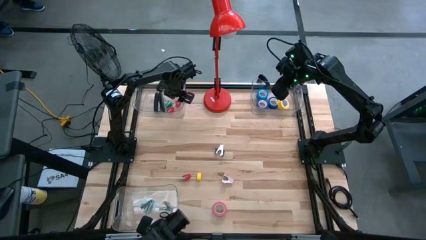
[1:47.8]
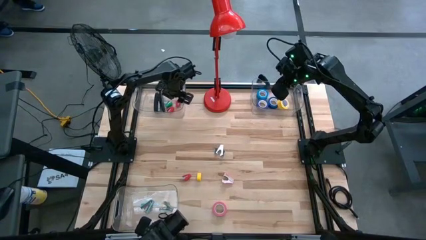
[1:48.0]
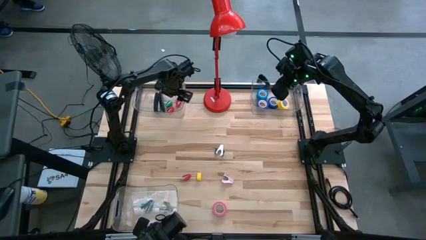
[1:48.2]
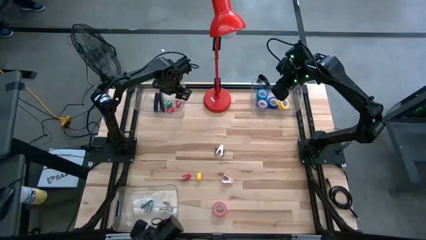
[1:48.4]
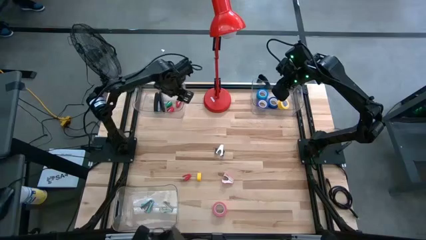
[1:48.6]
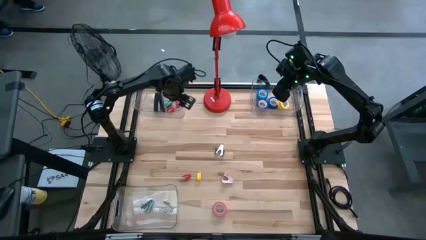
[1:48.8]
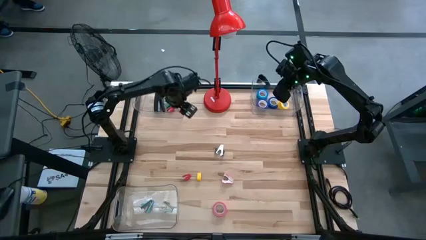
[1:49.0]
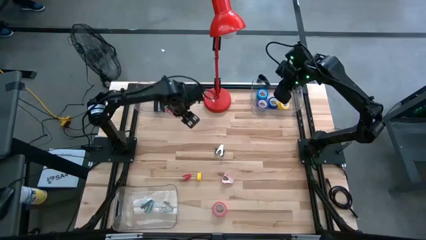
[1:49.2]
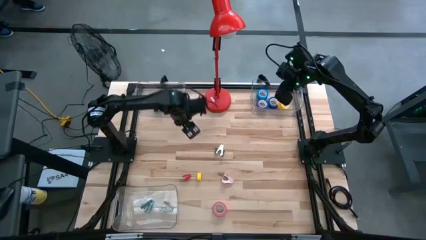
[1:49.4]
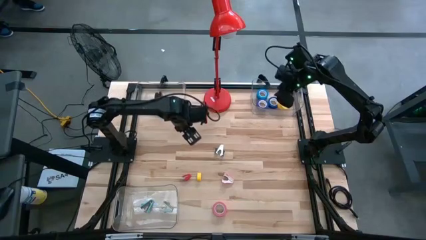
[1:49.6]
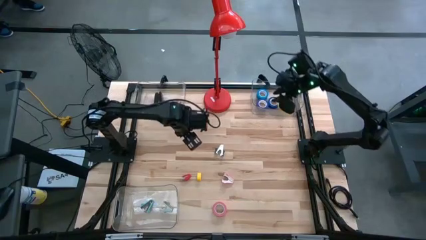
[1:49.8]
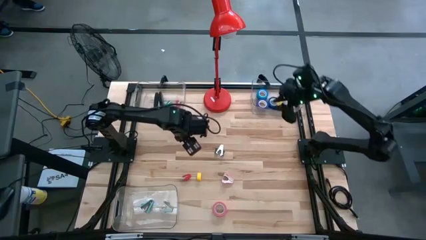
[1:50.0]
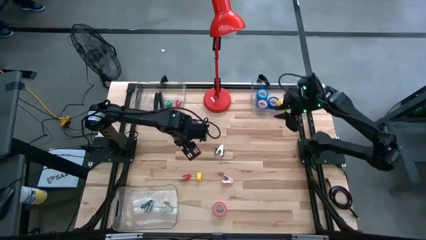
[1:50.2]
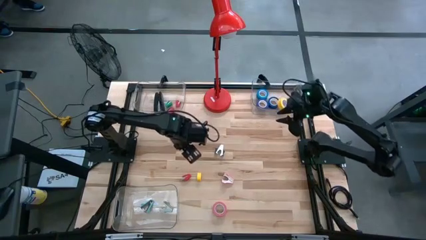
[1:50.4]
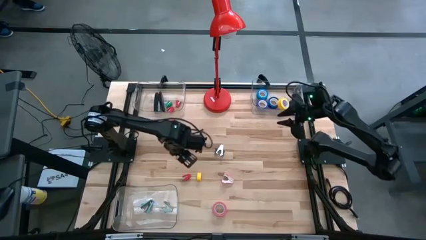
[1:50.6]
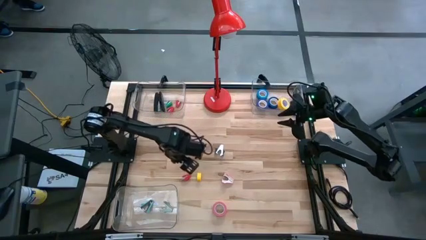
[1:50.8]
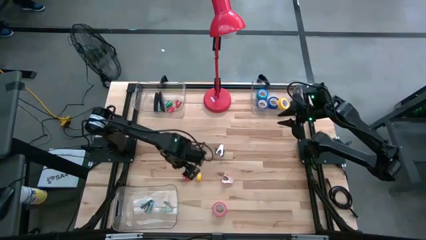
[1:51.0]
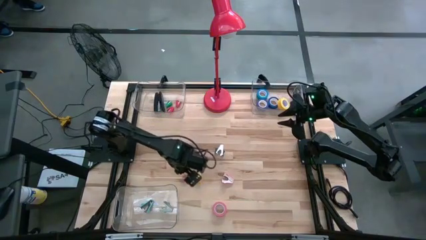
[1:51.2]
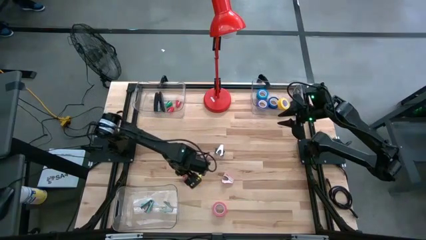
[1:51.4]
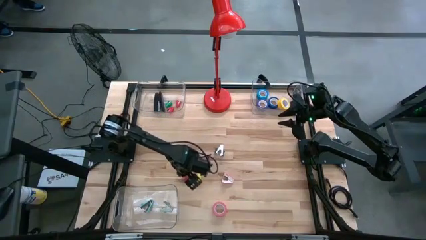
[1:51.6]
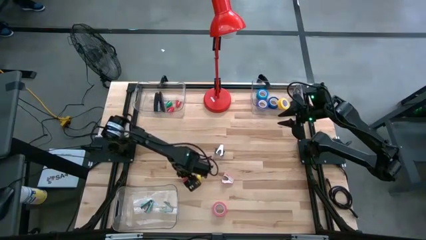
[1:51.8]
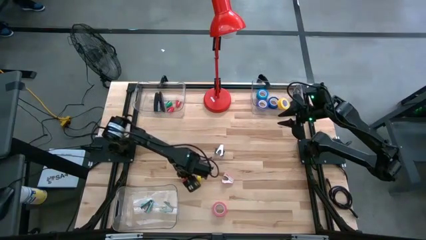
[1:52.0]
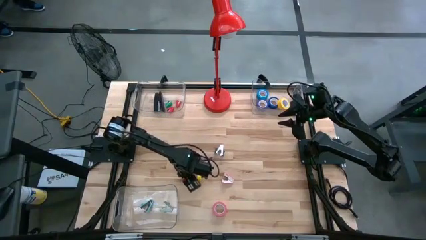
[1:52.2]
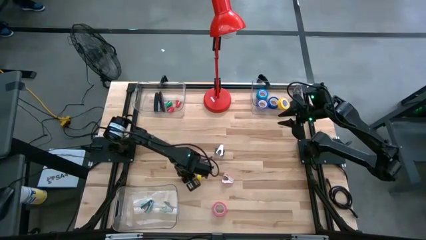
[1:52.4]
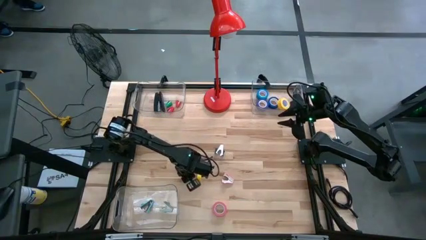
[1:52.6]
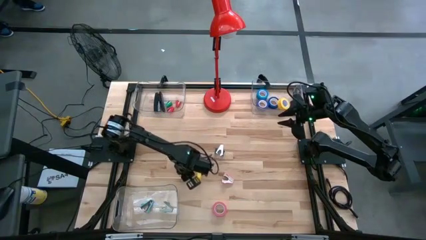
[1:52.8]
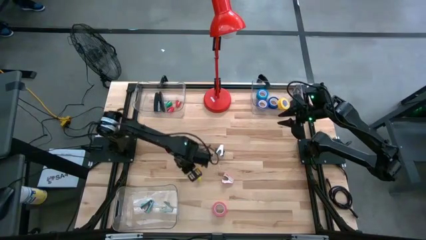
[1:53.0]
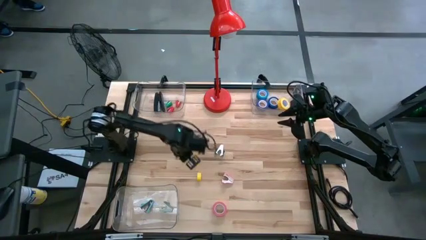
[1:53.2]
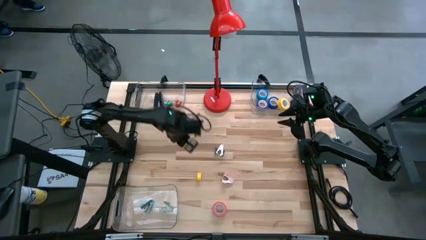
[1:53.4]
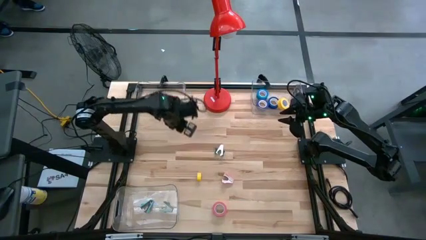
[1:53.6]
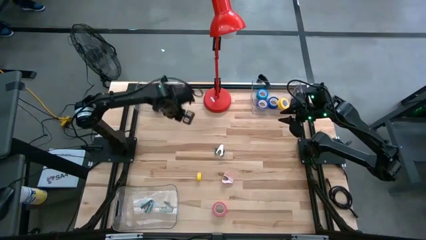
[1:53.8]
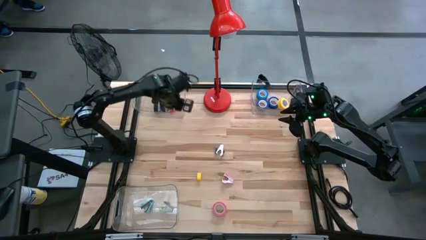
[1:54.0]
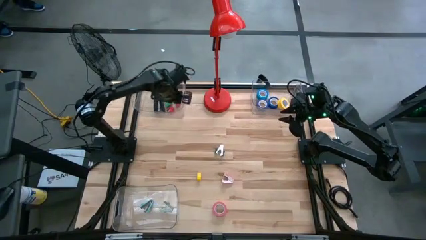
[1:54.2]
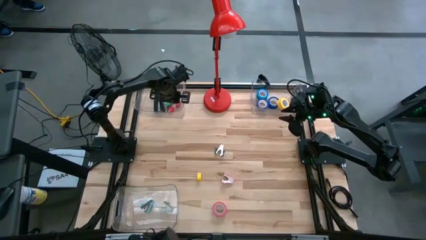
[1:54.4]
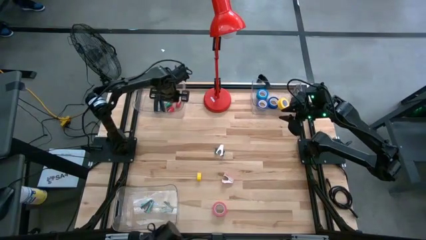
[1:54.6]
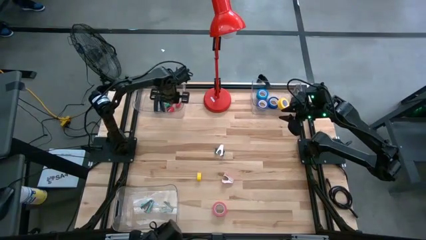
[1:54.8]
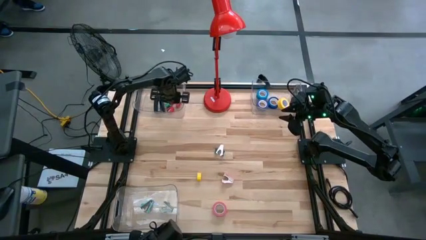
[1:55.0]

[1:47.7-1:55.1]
Task: Pick and place Stapler, Stapler remover, tape
Put the red stapler into the top left transparent bin

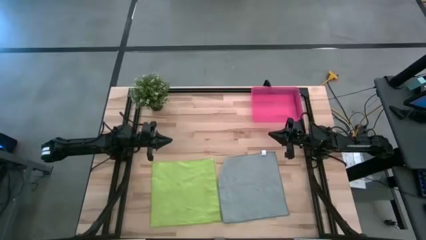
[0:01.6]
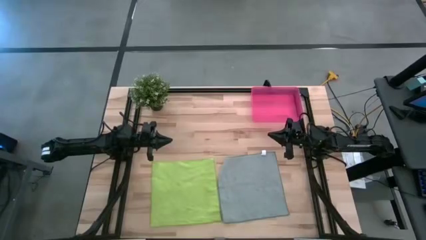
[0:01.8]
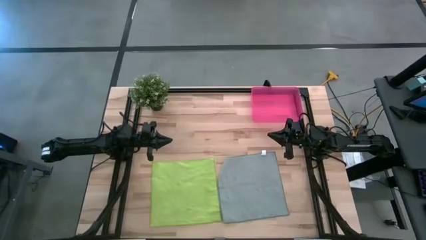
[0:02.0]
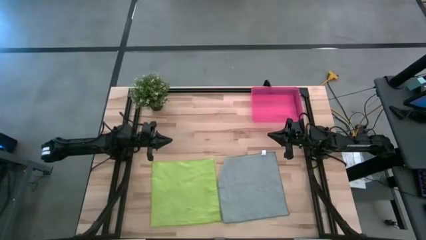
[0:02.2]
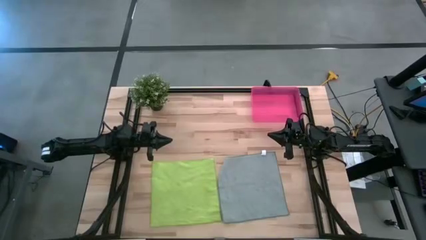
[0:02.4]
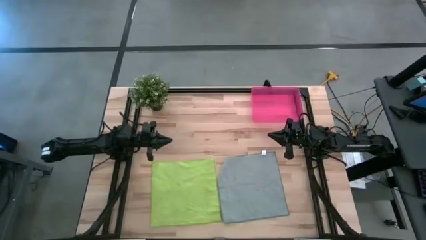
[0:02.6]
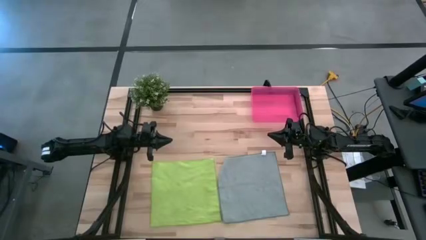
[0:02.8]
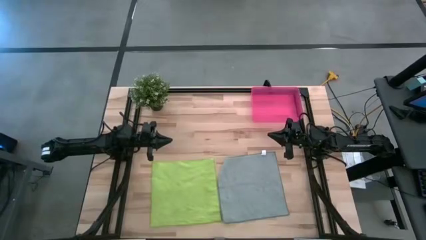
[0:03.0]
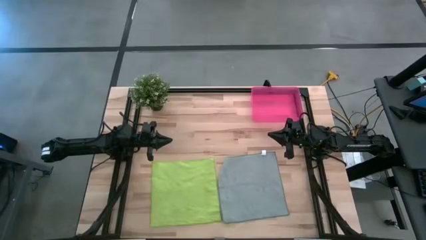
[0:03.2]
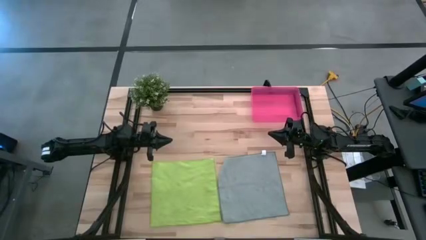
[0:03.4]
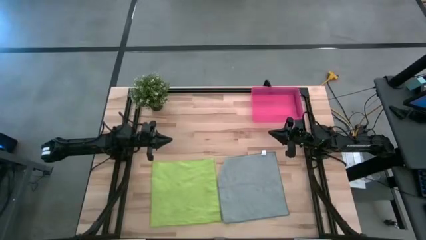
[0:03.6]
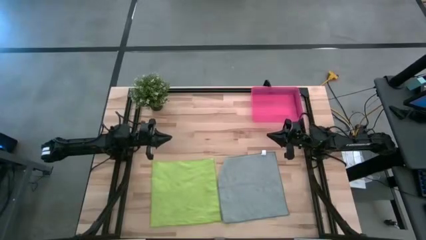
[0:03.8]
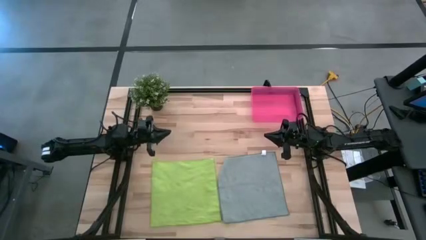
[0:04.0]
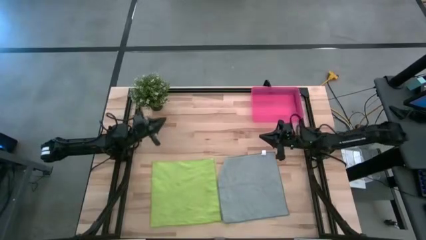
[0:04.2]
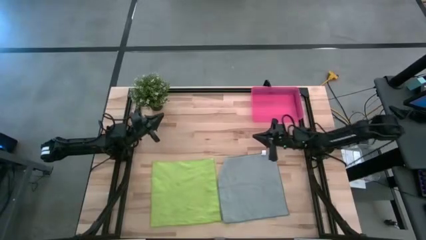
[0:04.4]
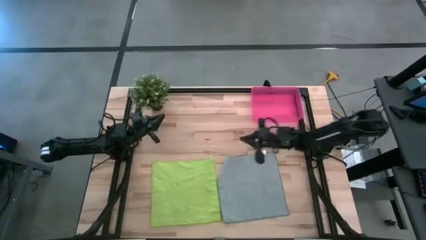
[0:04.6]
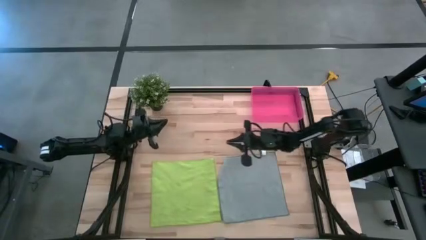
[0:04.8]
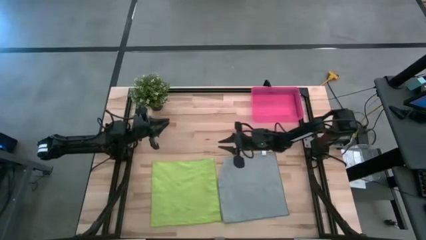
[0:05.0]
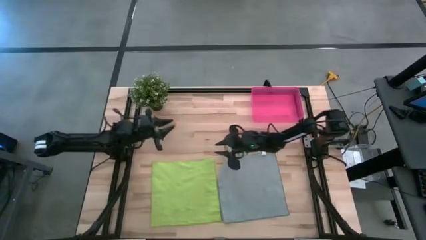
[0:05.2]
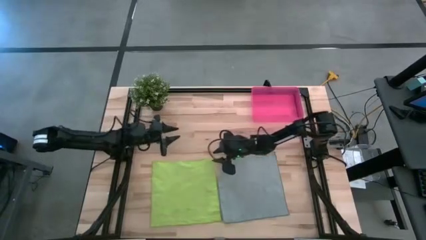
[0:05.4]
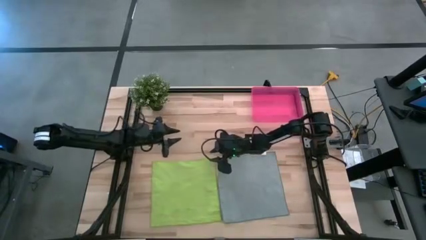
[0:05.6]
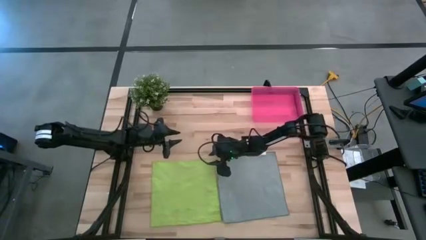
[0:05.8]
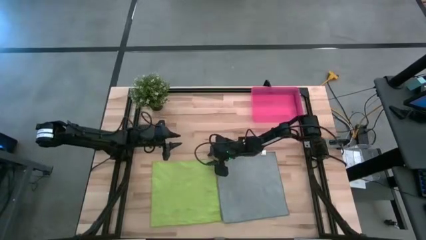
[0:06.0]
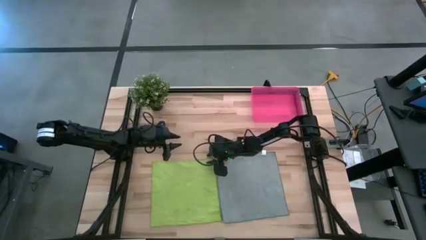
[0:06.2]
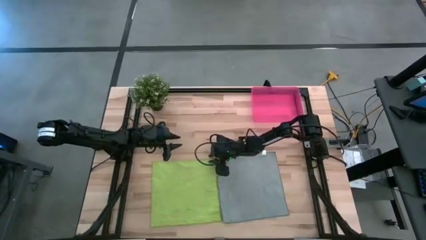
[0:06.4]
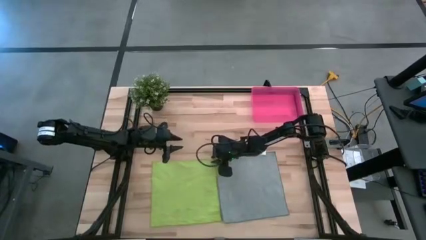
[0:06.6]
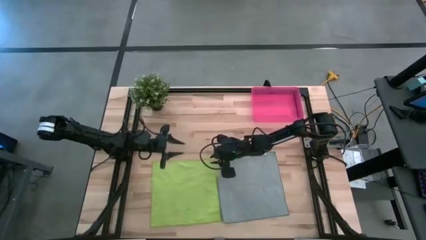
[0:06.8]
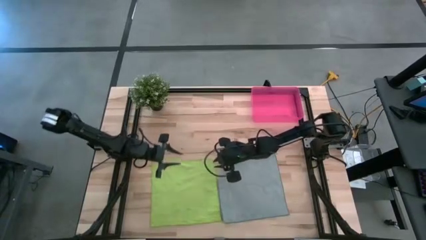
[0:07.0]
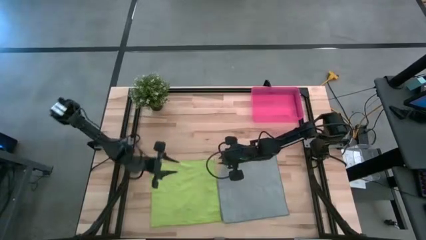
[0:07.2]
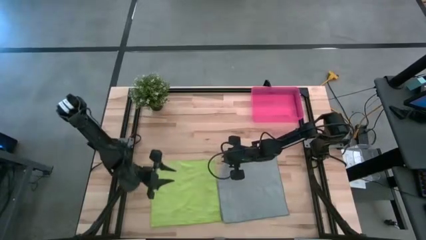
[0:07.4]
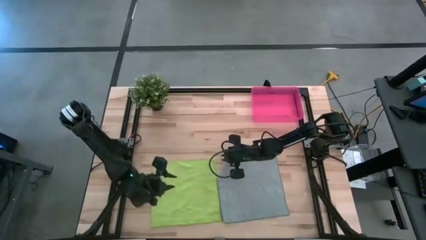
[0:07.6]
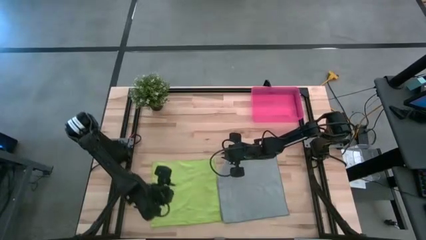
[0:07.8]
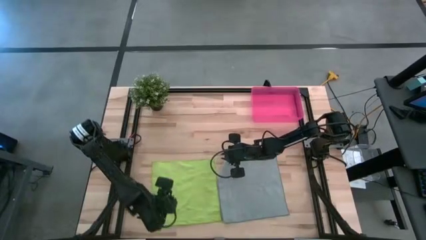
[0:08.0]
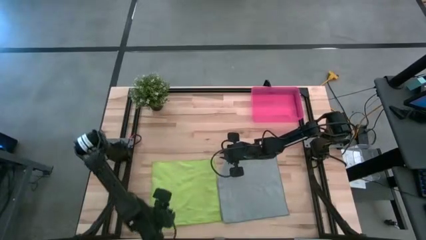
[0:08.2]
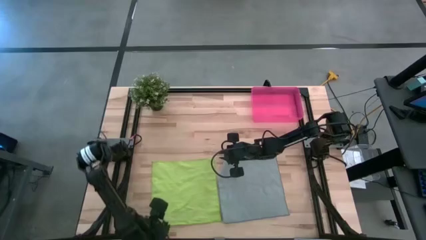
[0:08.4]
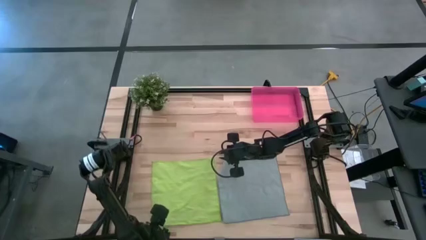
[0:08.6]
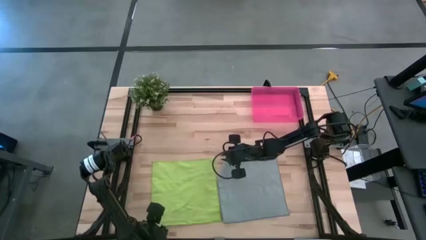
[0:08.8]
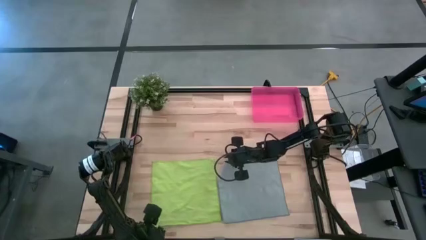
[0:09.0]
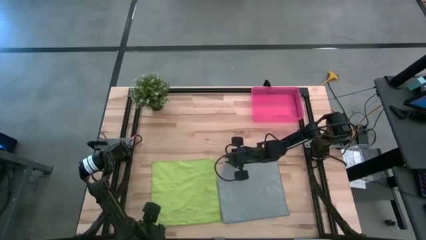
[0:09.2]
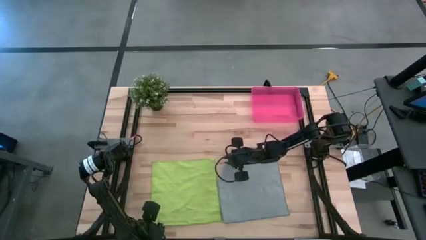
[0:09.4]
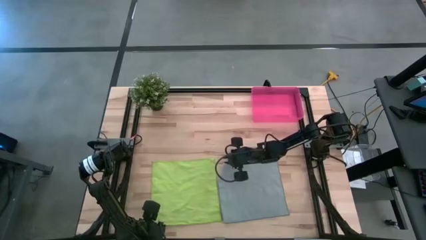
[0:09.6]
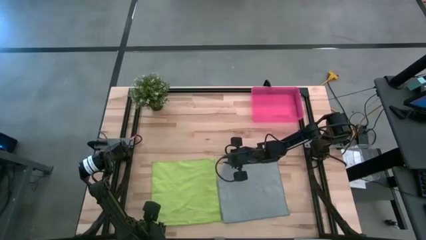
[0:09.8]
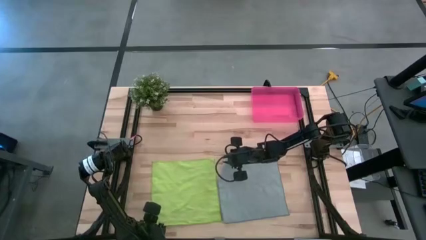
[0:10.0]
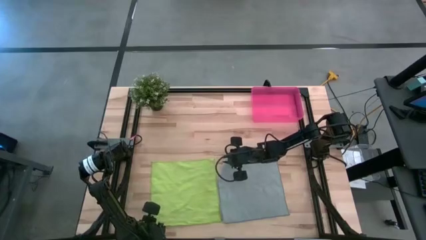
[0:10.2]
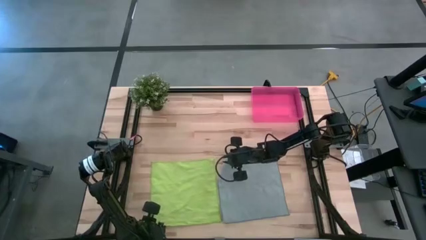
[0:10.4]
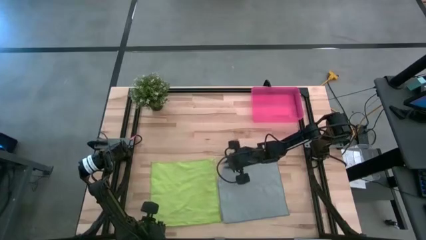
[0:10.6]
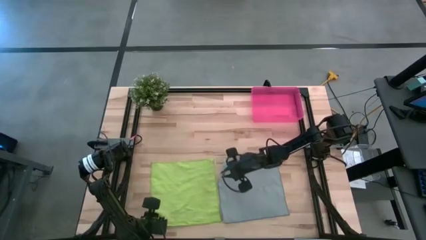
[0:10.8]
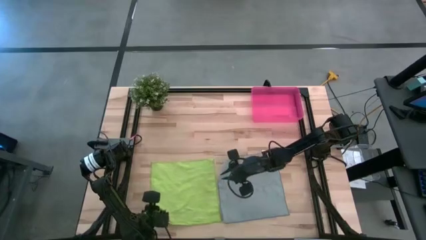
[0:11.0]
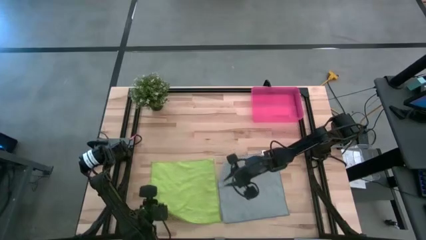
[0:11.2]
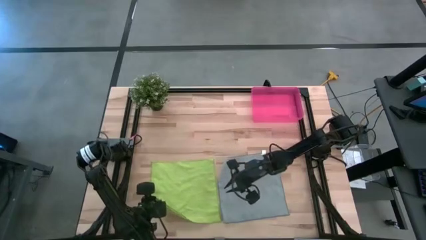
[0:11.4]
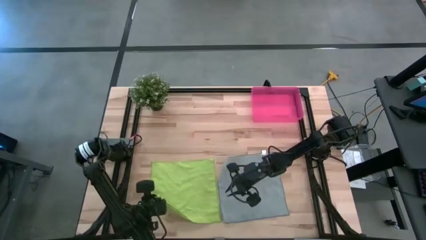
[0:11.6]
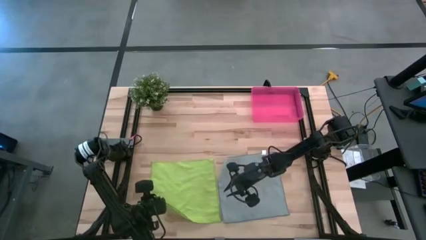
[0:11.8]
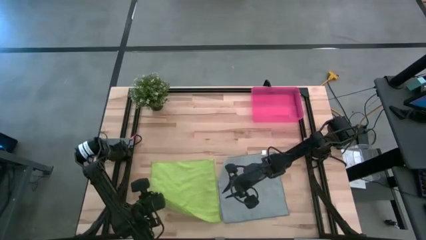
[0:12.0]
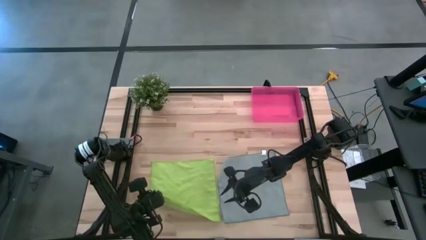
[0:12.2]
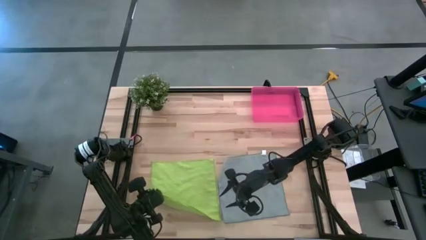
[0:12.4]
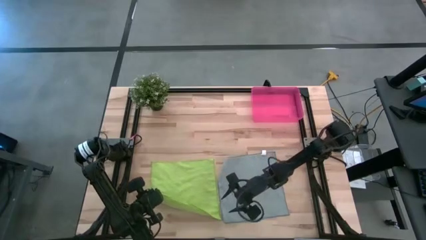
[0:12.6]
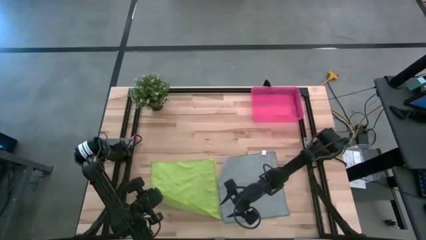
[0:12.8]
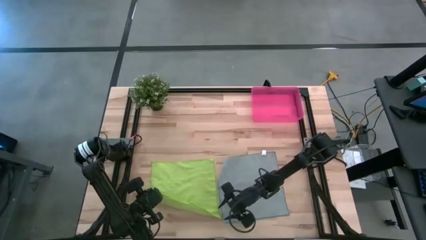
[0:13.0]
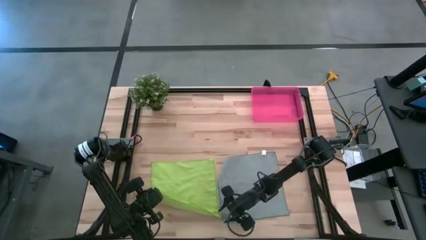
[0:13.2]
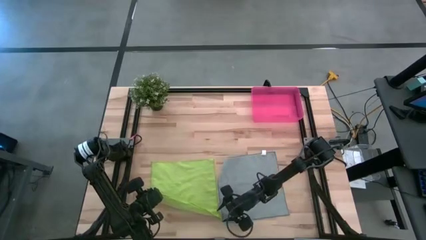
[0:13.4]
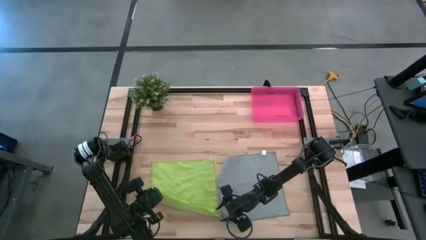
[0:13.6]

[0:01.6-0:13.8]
Task: Roll microfiber towels into tight, uniform cylinder then place into a basket
Fold the green microfiber cloth
